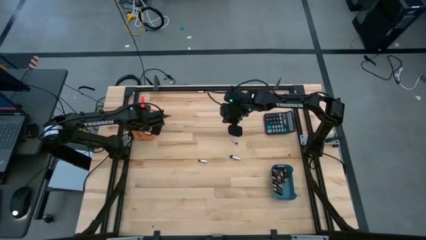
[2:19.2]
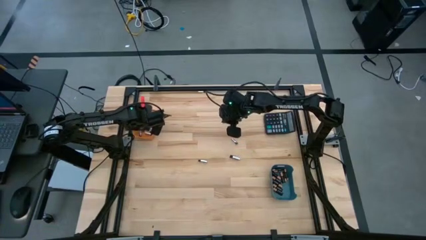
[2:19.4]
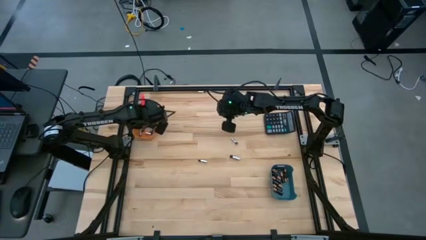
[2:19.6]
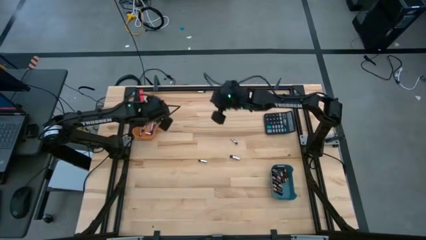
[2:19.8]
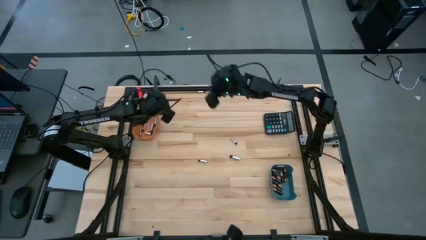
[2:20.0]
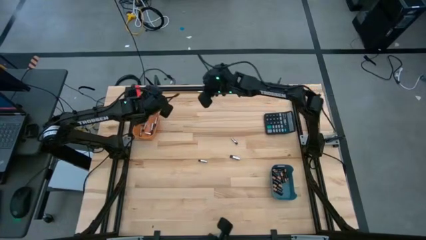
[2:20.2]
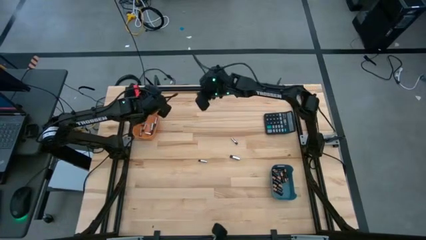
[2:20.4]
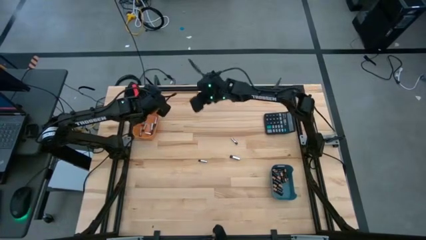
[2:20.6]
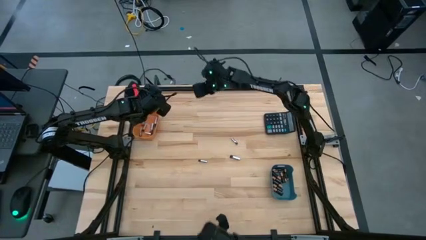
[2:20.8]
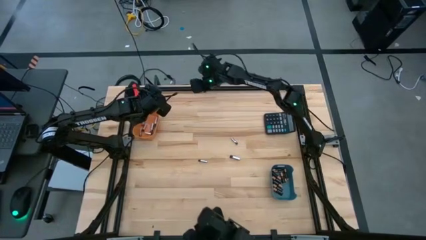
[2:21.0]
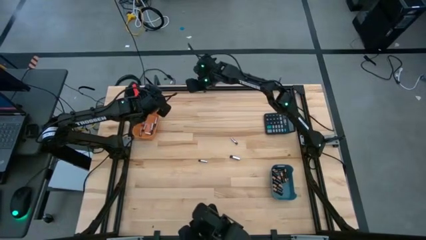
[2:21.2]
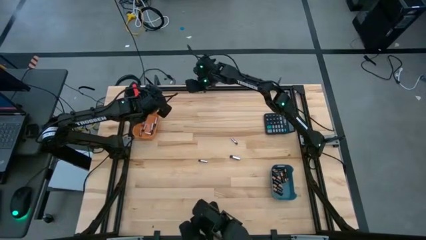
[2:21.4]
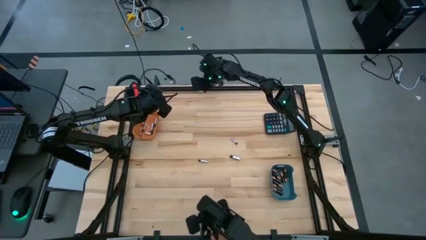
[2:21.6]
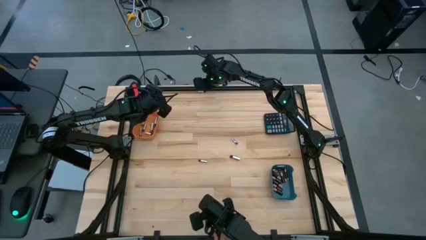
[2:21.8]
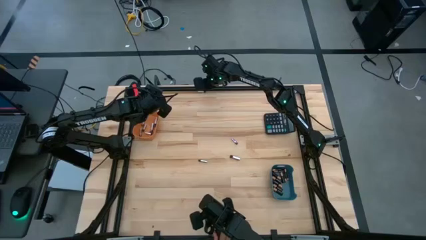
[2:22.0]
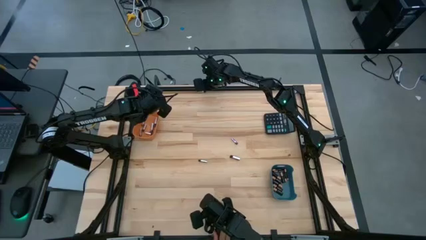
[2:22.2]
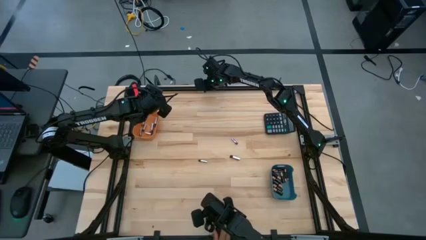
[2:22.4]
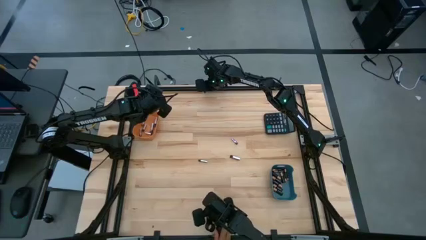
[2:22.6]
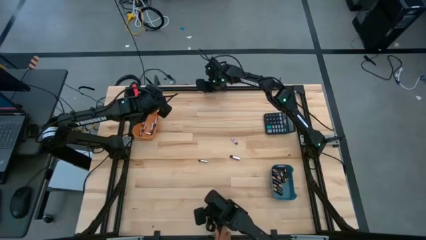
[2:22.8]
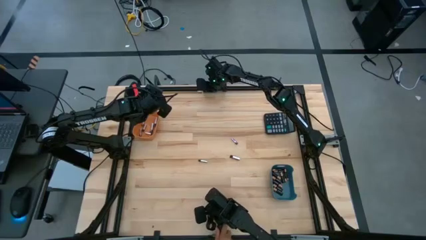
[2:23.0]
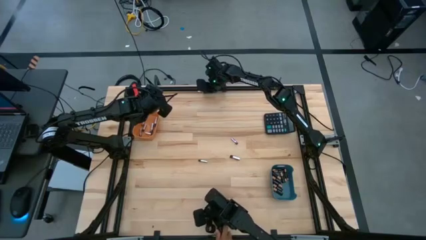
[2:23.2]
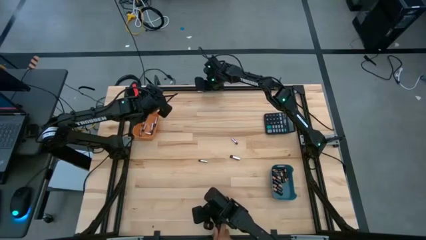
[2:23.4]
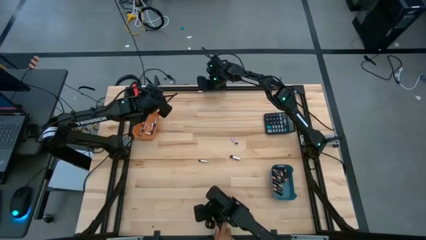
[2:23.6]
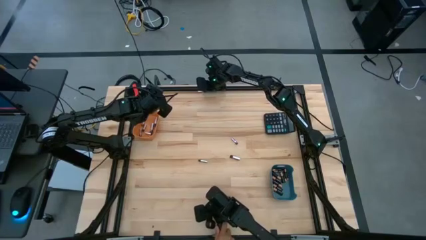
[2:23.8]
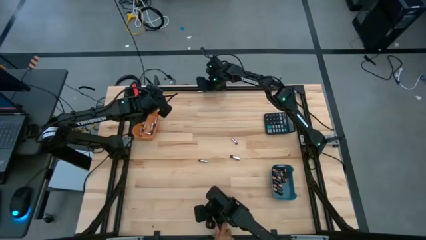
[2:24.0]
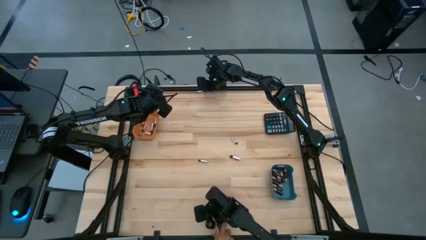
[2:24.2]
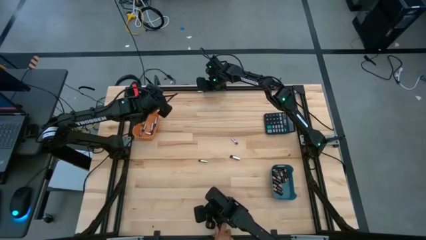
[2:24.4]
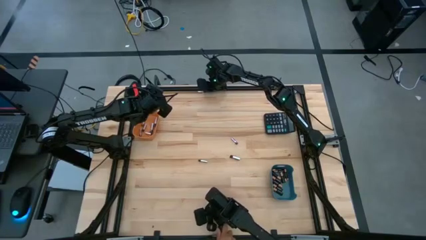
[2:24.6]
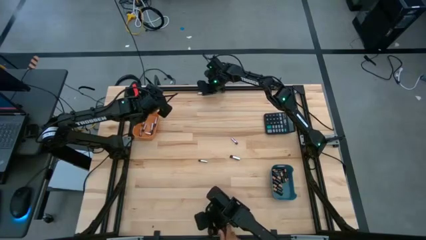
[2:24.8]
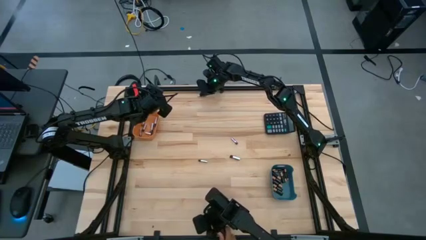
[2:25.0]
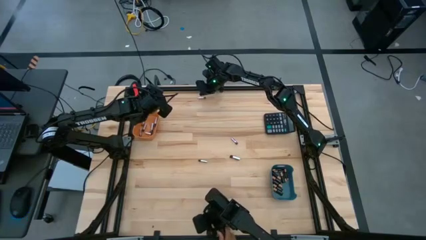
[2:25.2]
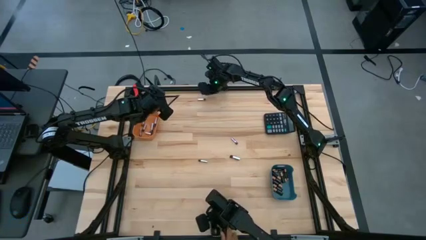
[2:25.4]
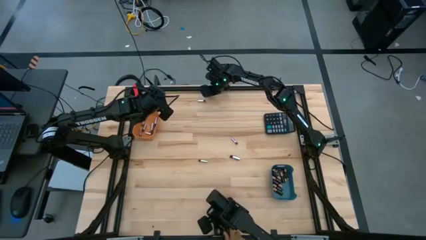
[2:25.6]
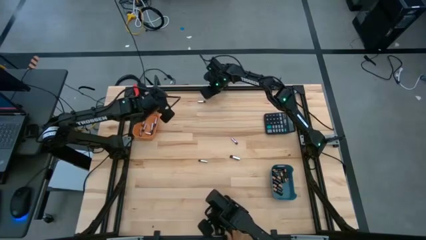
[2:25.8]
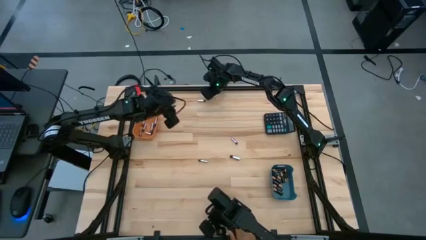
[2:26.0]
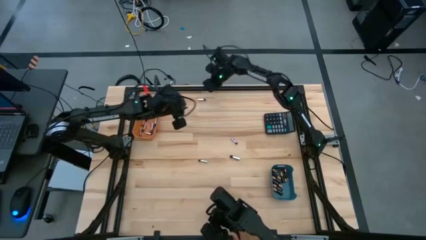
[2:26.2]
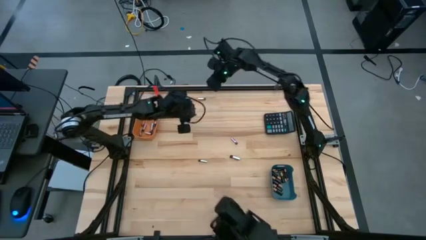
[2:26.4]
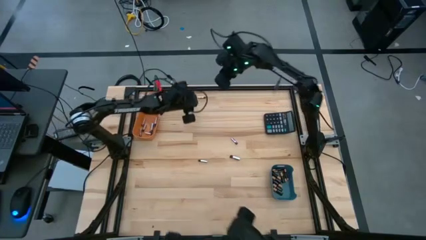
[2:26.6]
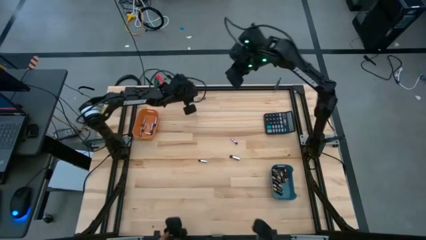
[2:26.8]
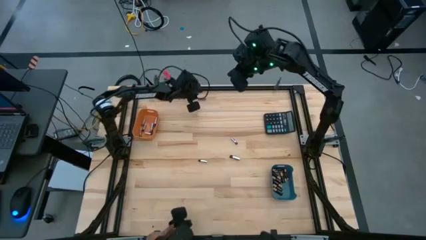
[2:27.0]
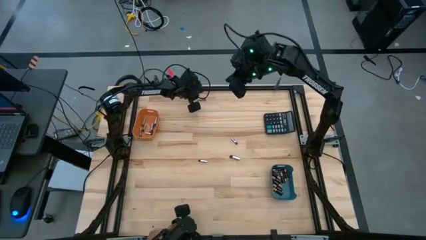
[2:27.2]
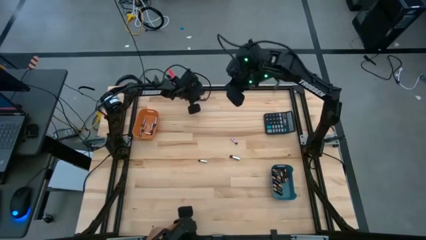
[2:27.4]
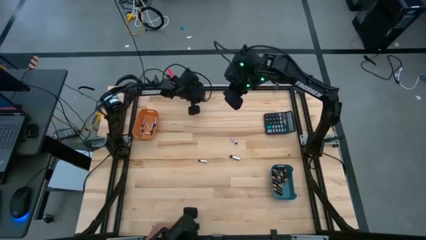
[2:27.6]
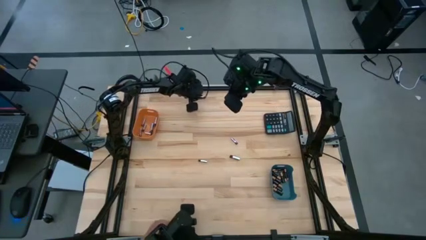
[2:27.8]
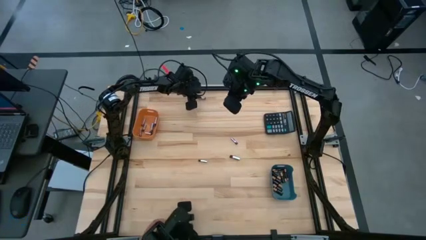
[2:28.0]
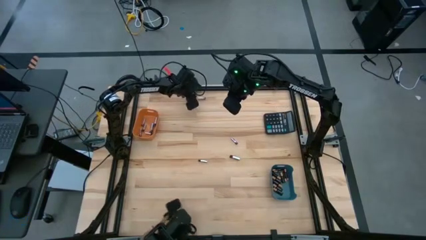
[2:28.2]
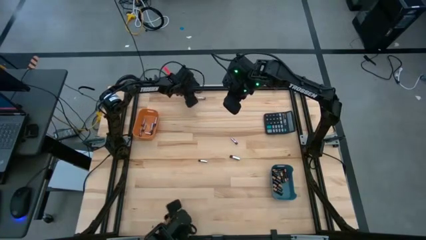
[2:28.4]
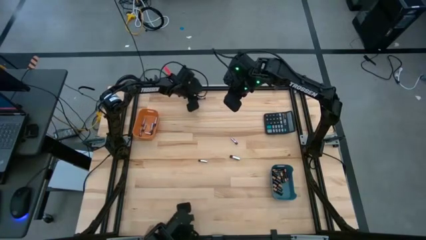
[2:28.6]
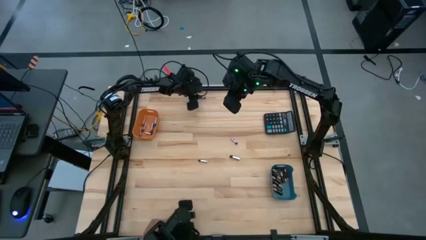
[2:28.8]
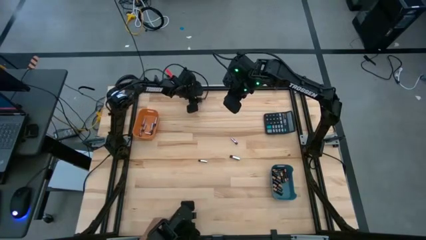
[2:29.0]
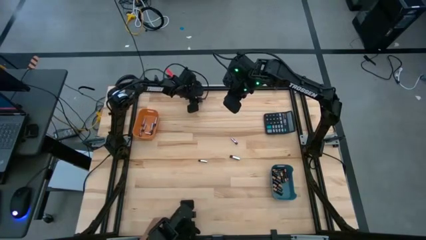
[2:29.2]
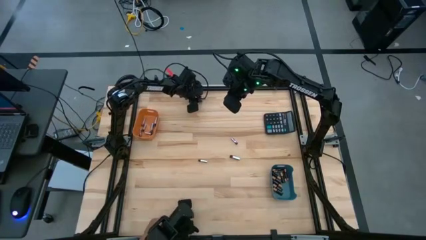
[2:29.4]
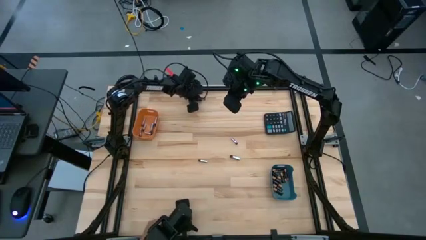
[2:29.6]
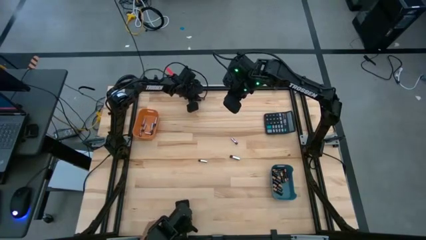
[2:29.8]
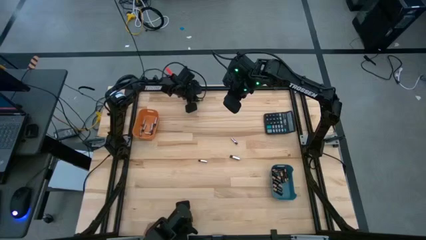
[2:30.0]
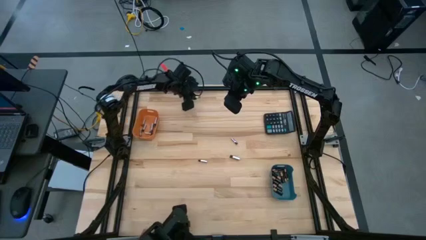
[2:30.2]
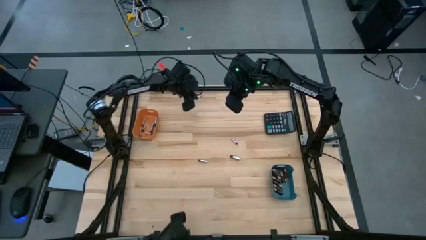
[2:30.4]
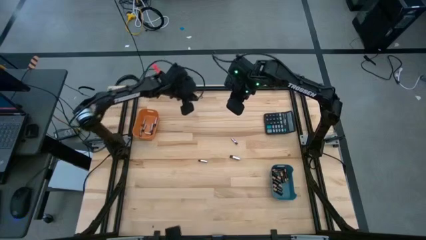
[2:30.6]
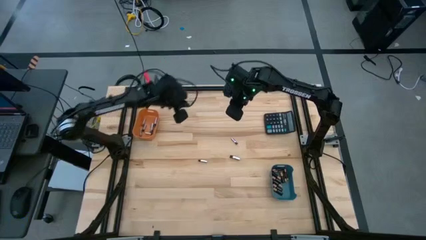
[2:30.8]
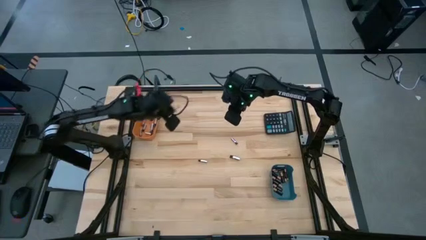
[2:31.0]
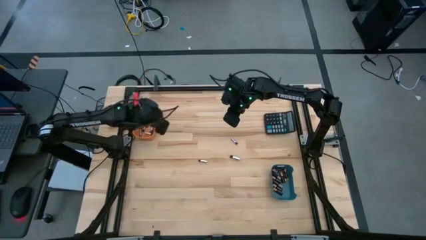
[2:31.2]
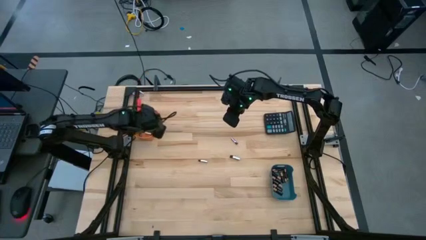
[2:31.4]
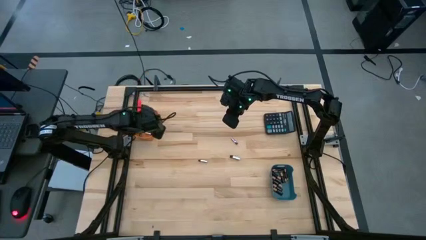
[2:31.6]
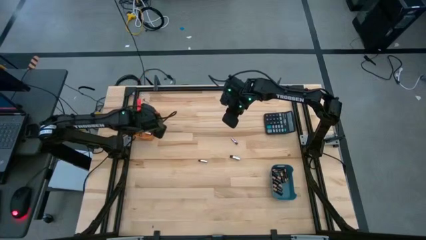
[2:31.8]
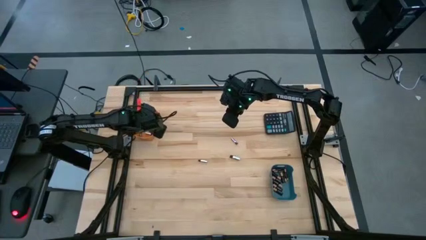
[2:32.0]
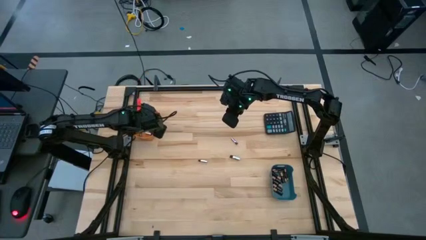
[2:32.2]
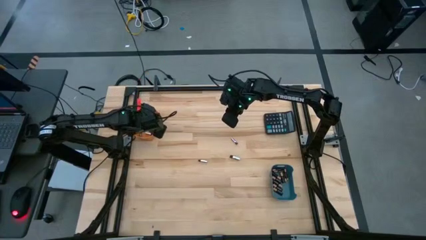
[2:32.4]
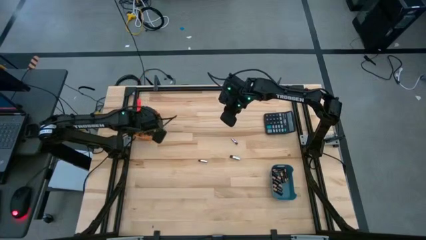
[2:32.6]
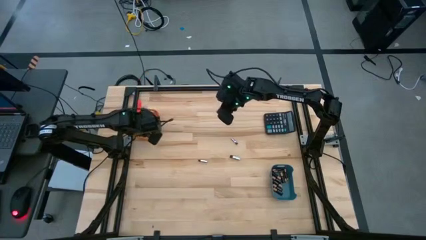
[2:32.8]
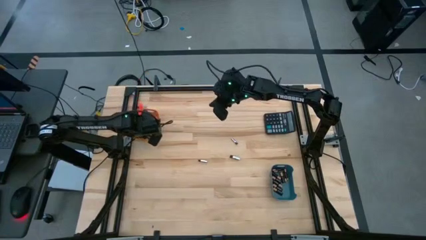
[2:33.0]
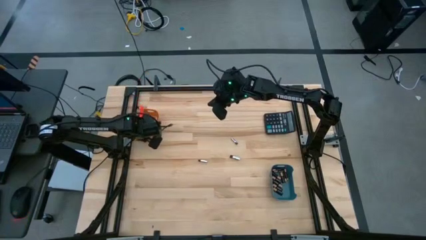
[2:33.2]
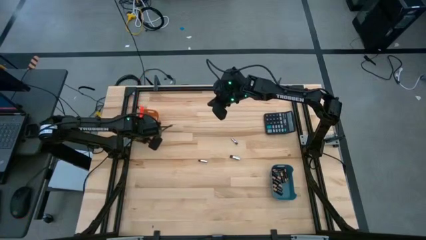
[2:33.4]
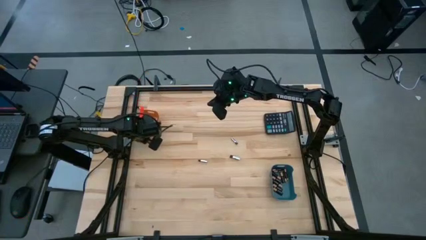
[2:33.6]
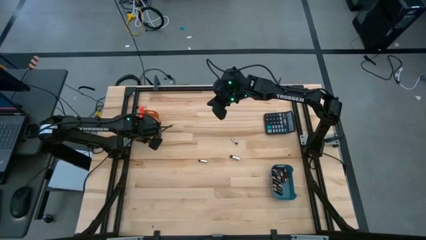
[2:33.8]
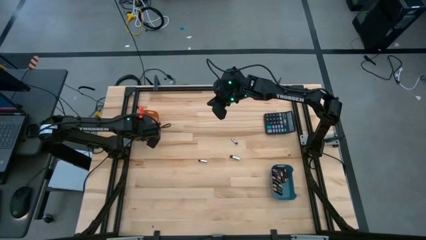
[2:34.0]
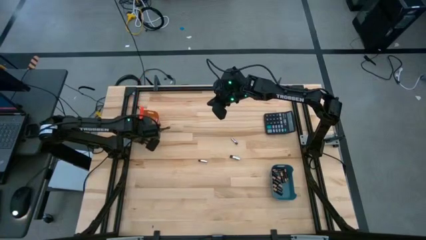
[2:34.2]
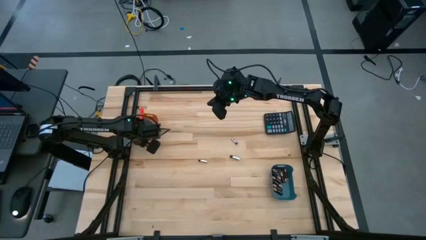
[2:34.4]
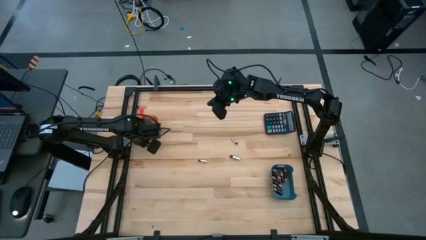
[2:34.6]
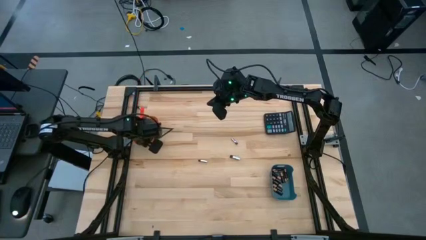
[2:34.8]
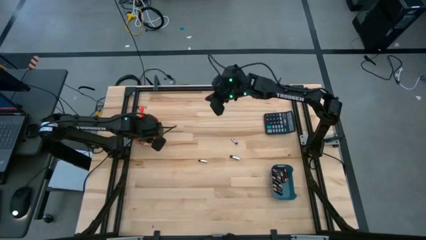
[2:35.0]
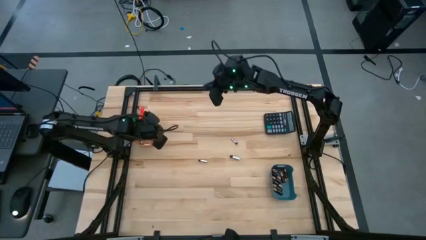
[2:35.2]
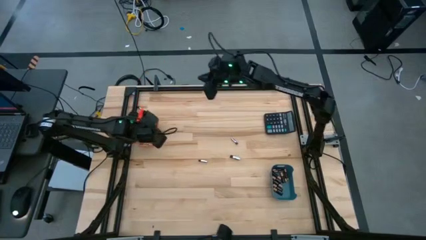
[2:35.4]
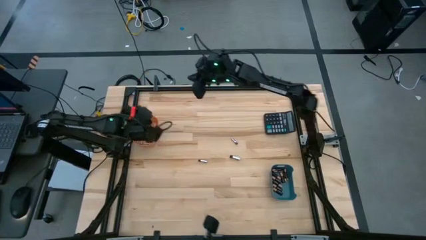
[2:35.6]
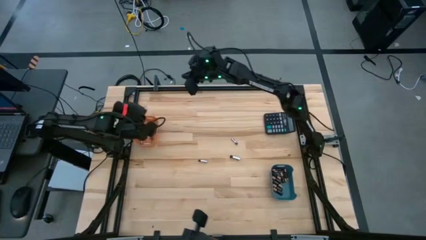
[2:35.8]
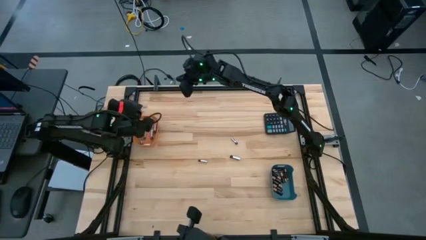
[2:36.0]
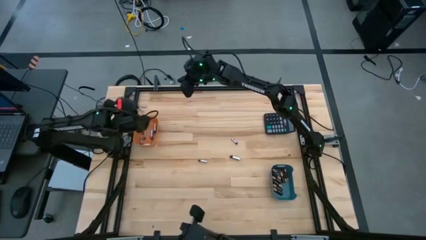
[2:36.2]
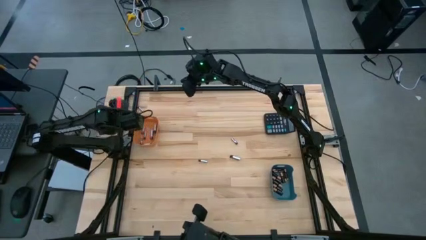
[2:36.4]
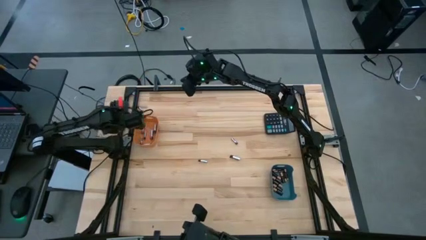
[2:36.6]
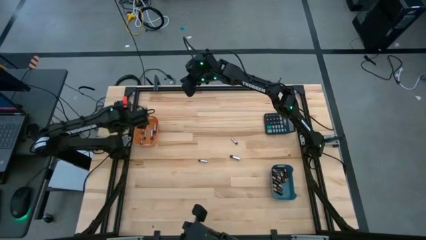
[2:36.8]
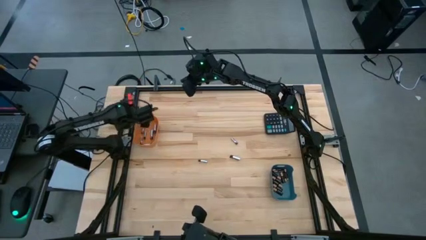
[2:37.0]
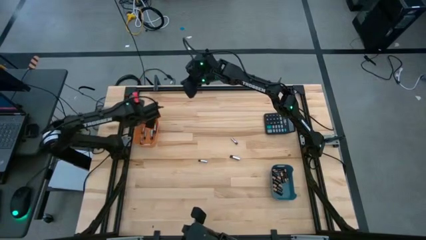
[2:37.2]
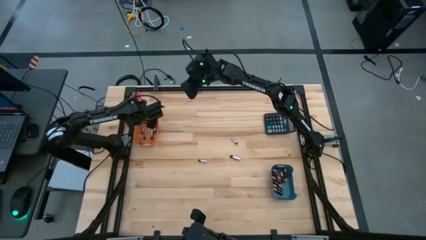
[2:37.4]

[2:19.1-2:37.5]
Task: Sort batteries
Put the silver battery into the orange bin
